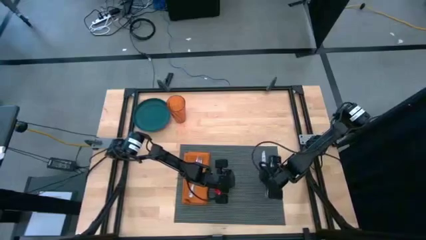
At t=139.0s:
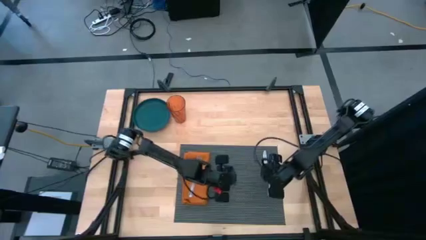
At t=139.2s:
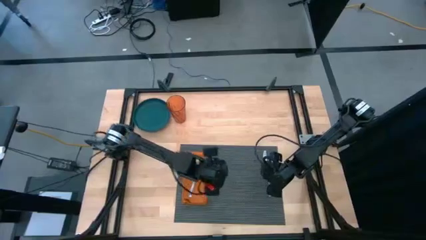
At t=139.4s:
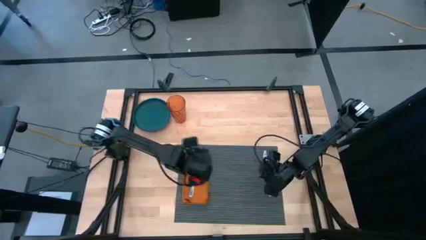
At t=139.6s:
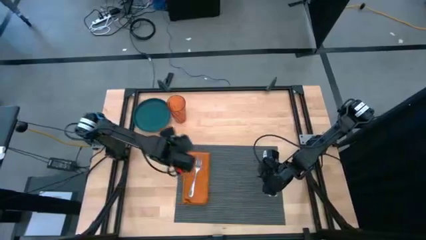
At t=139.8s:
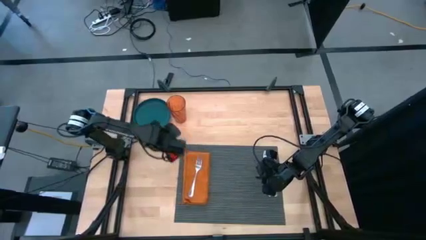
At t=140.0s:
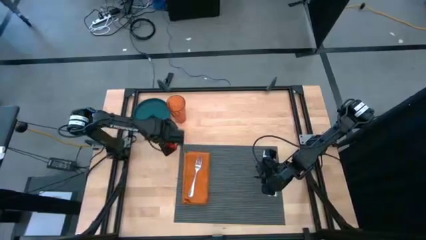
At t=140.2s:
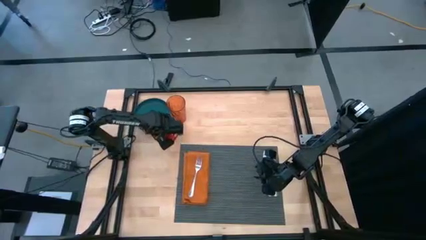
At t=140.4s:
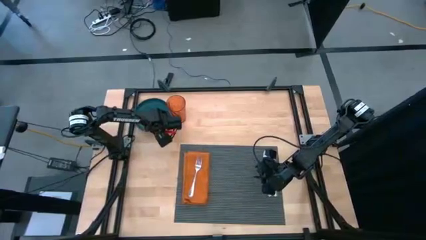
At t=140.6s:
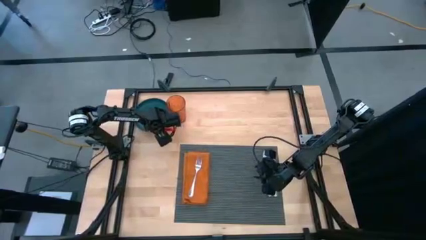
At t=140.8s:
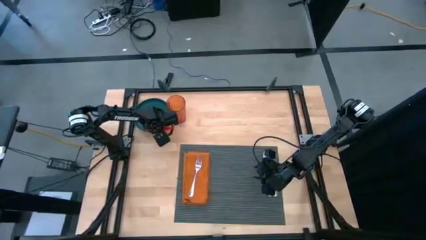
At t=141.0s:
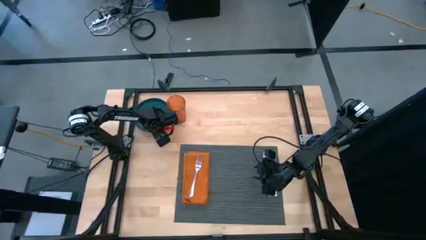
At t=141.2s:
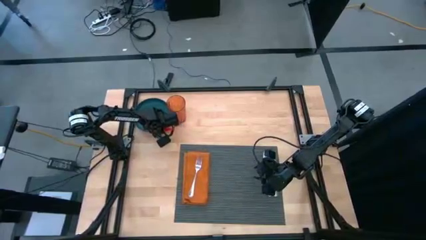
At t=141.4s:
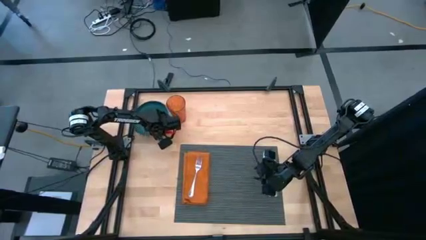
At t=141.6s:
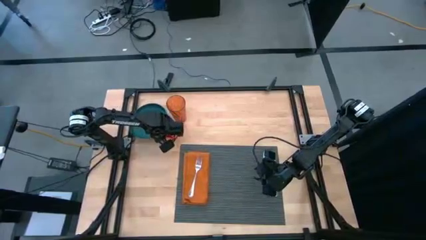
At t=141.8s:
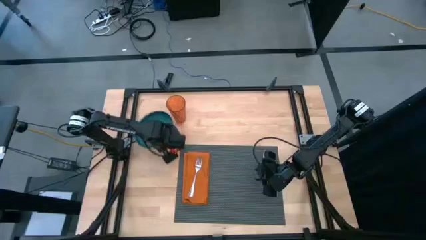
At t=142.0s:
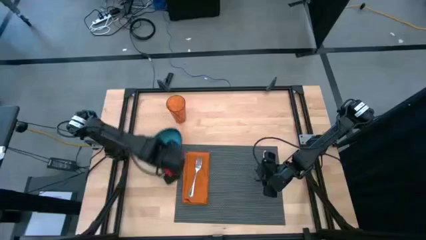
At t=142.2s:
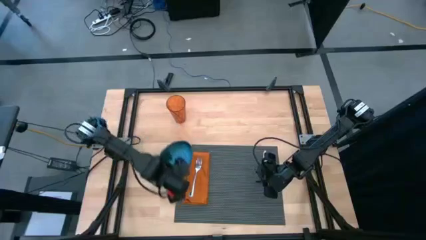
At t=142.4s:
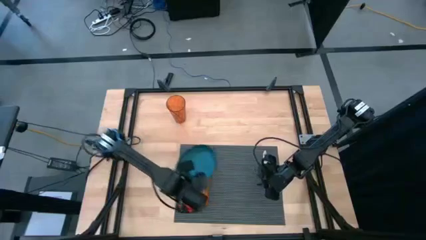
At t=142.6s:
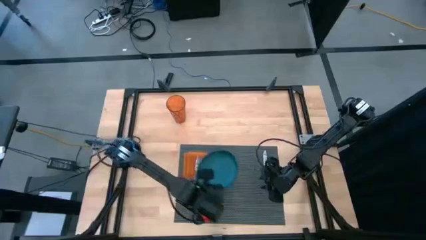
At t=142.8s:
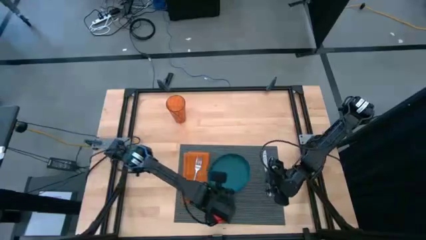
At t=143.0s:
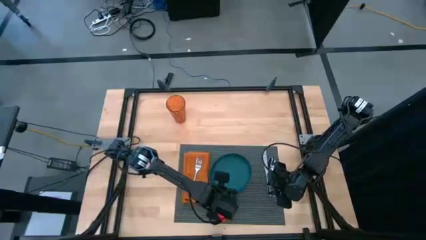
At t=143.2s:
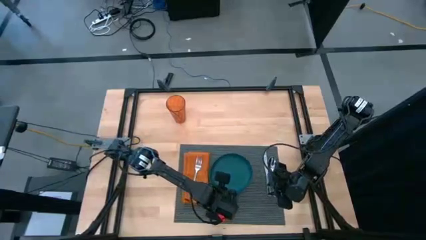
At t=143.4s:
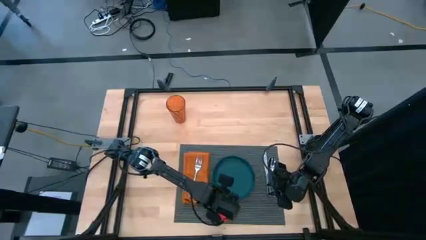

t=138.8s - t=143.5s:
Task: Set table place
Put the blue plate on top of the black placemat to the right of the orange table napkin

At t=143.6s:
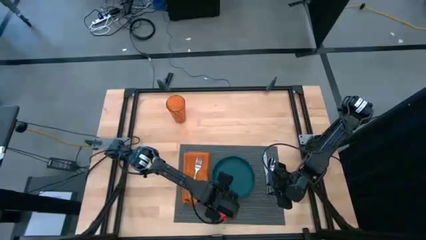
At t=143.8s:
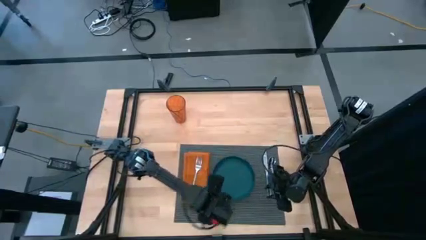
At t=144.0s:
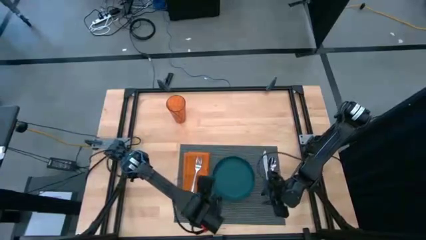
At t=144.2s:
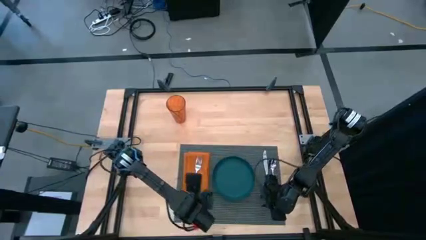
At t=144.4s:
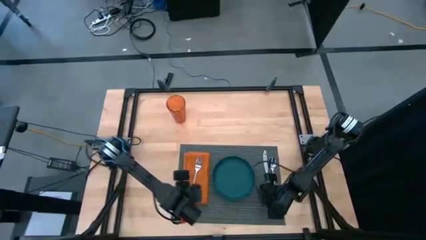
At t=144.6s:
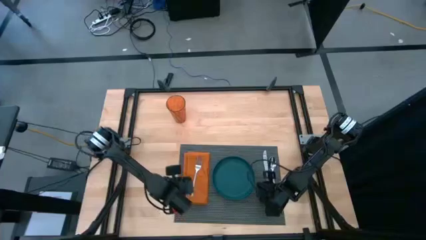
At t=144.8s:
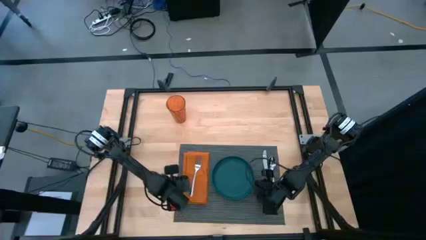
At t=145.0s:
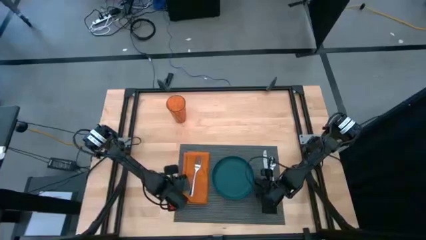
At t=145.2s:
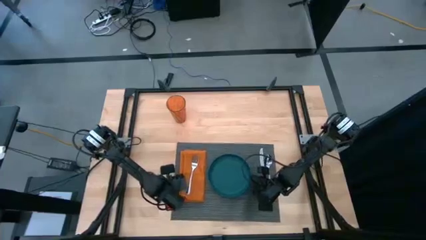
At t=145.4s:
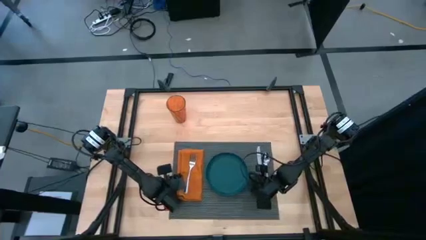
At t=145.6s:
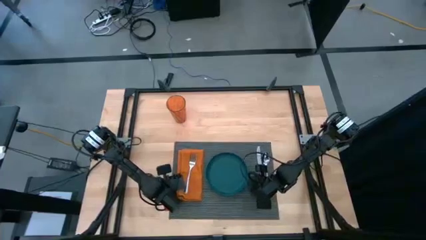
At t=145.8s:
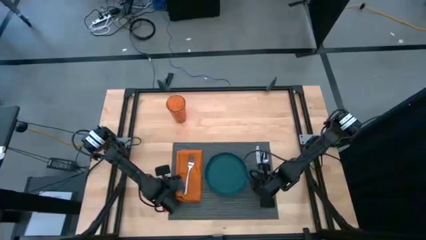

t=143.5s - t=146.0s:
Adjust the black placemat

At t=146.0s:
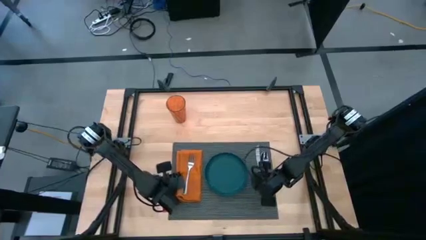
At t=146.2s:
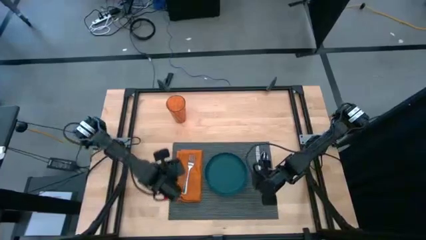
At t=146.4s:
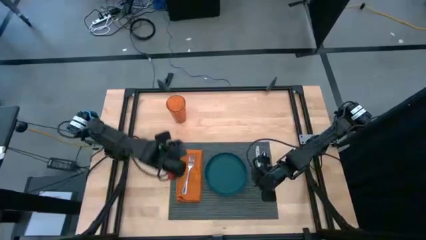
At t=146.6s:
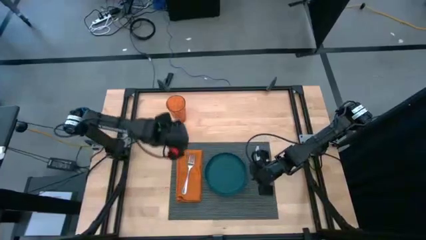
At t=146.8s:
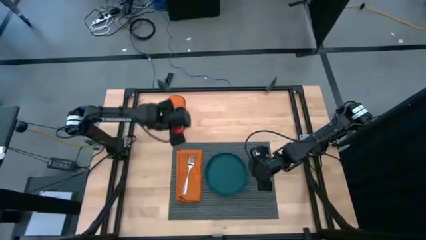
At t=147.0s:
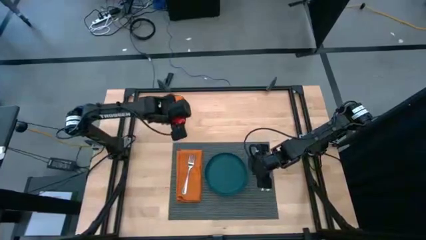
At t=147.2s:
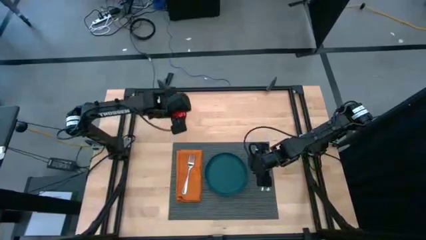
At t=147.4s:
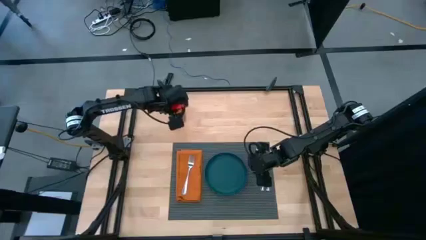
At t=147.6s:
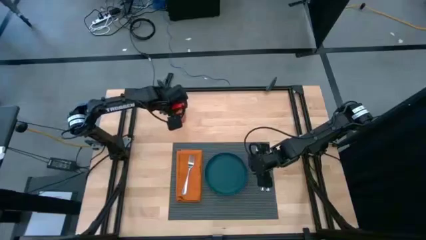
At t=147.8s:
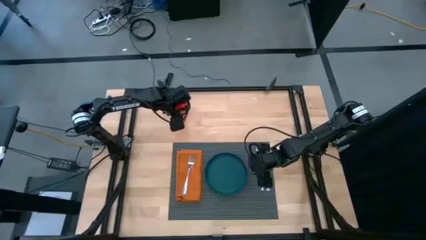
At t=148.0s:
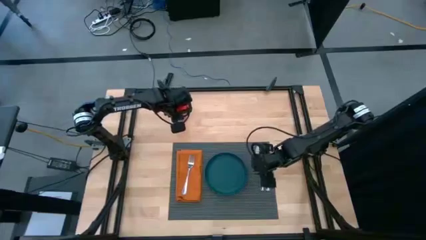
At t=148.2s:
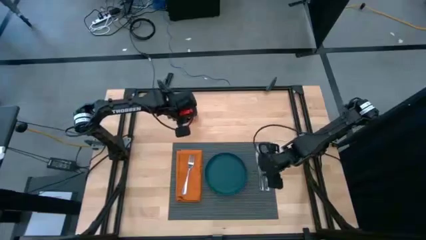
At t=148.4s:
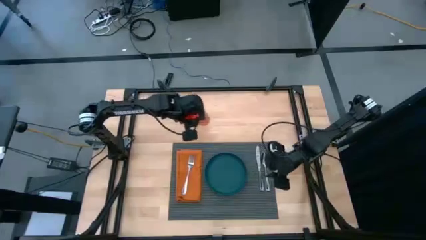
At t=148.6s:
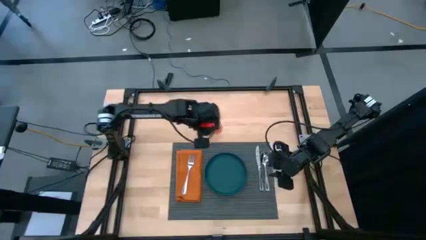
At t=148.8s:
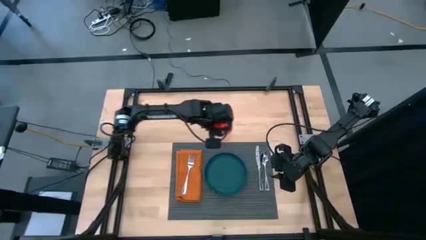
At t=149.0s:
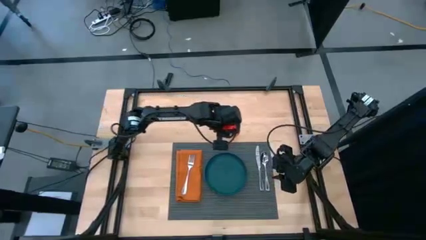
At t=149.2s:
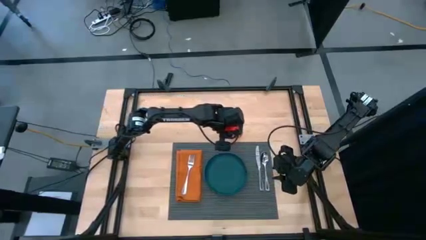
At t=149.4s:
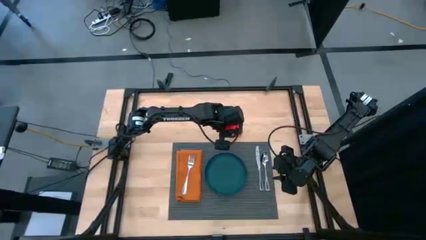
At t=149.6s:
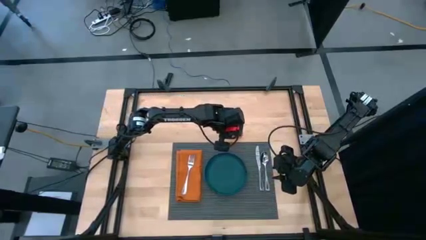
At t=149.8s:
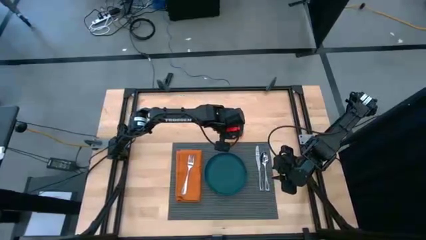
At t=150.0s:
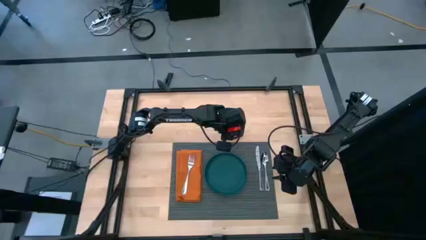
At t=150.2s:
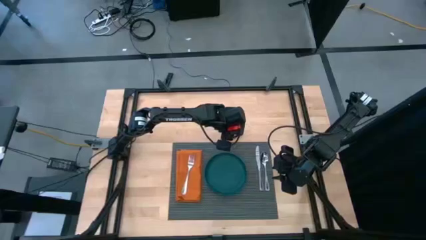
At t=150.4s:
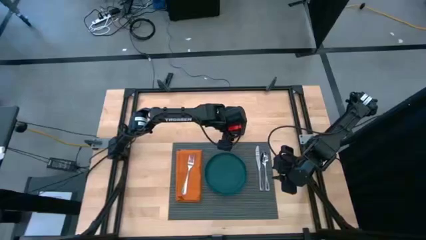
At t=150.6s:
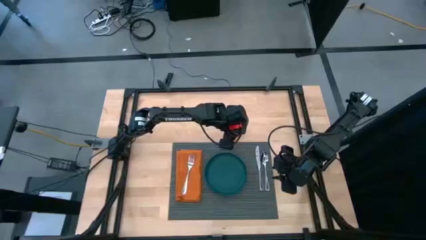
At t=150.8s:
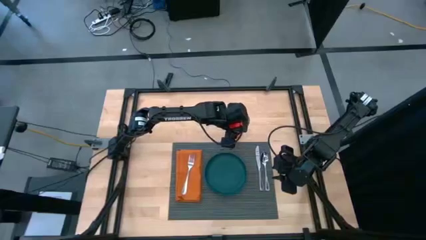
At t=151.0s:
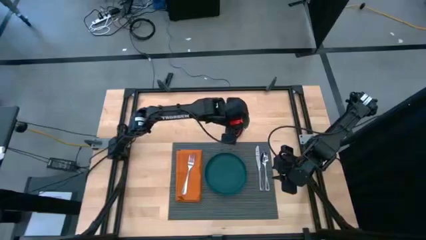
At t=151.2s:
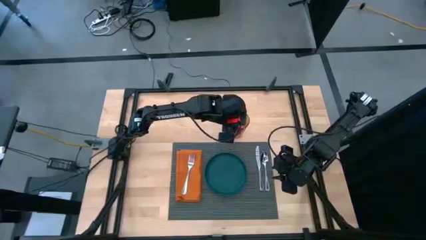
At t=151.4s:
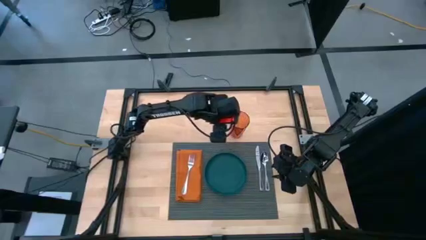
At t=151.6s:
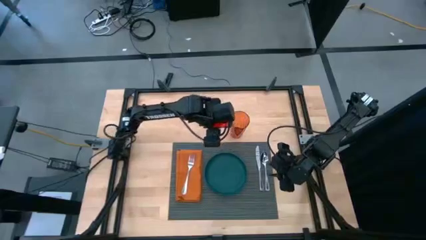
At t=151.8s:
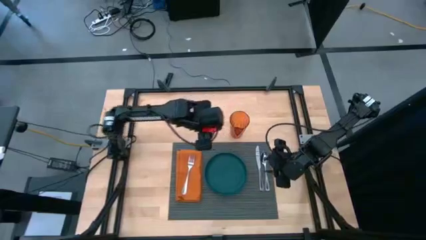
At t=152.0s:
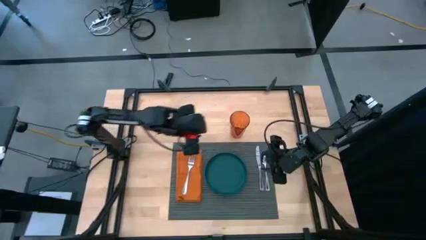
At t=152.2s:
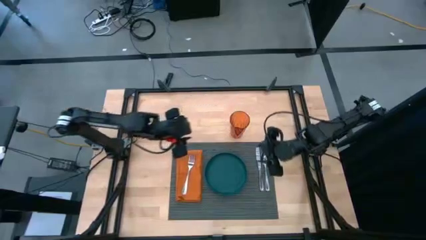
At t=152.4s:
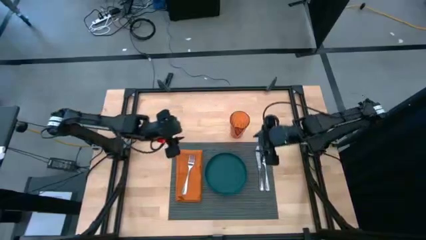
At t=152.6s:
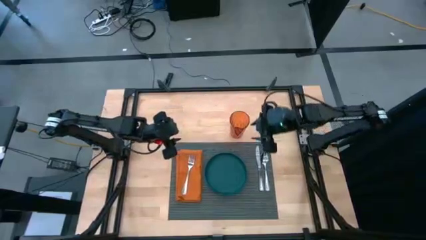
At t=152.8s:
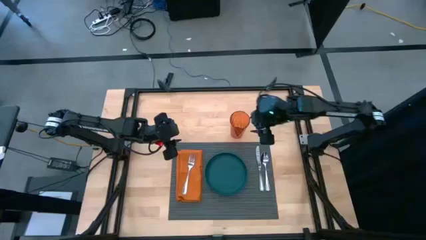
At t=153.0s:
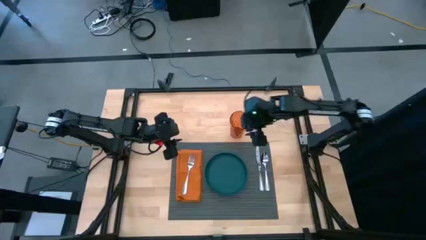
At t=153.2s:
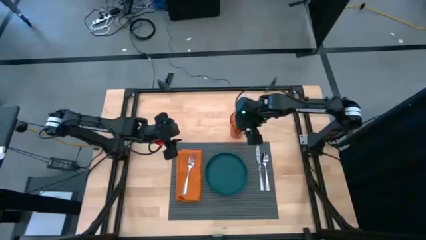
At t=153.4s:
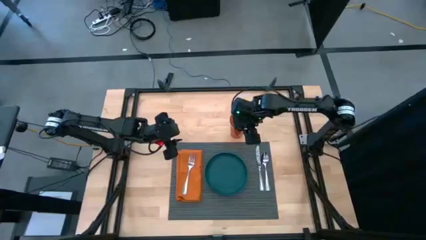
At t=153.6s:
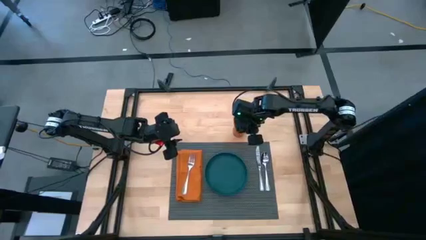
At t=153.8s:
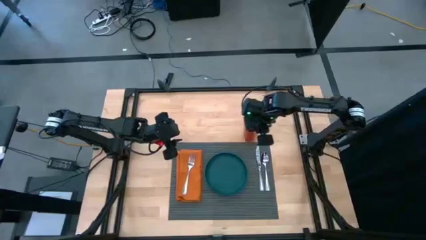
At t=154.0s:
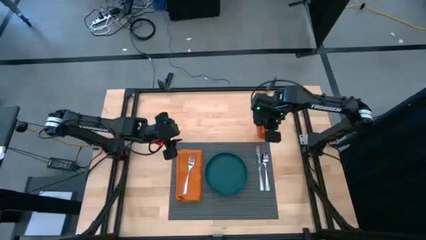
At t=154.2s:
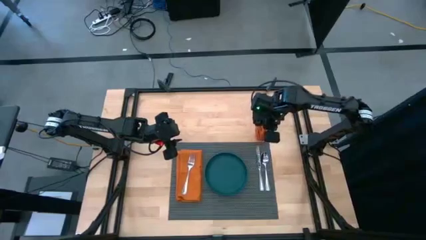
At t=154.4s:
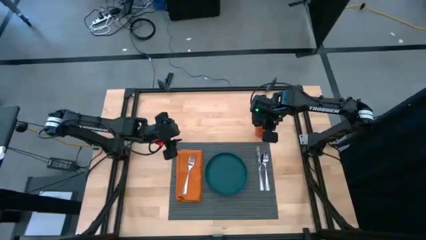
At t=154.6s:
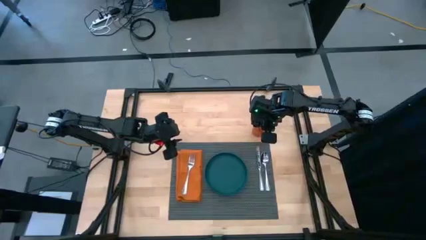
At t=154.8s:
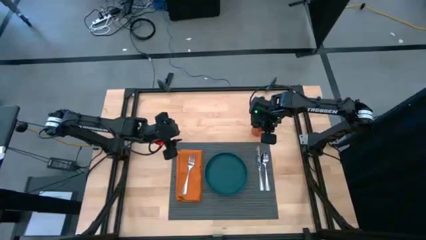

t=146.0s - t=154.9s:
Put the orange cup to the top left of the black placemat
